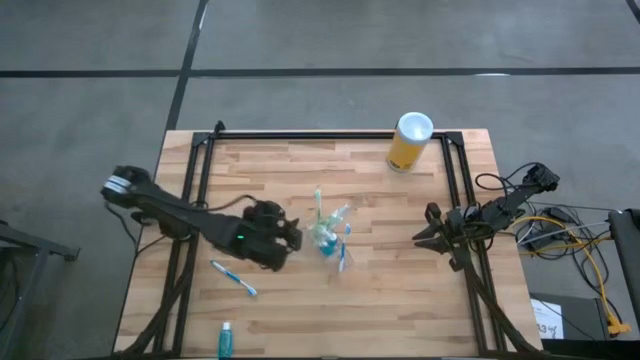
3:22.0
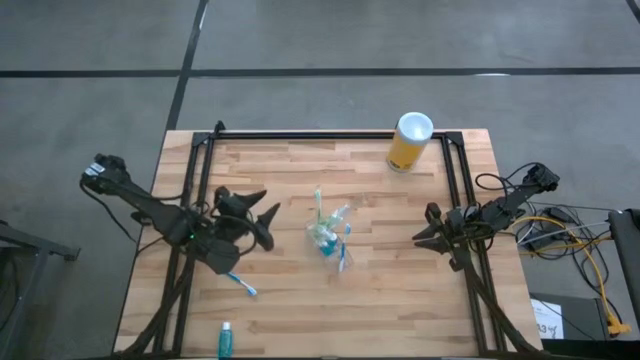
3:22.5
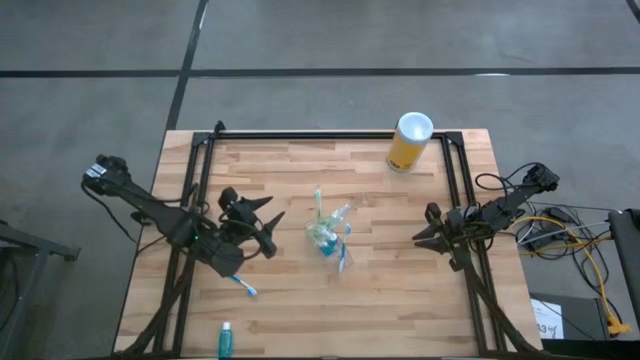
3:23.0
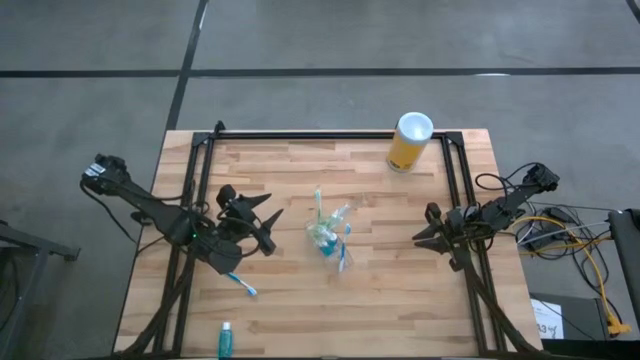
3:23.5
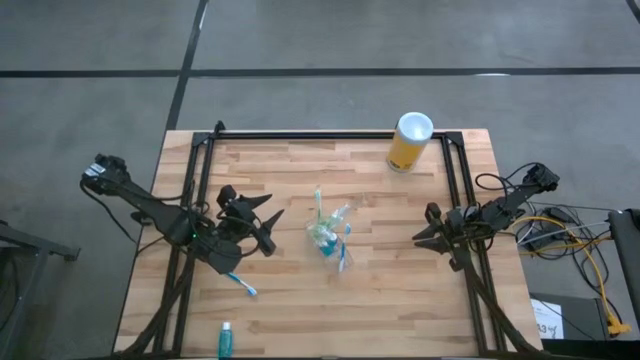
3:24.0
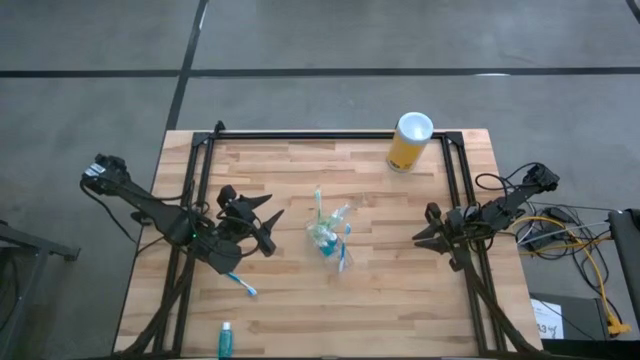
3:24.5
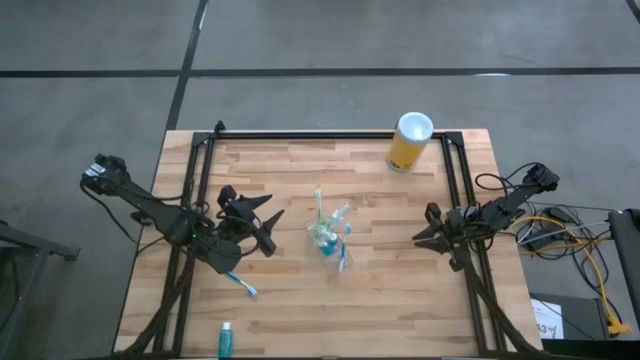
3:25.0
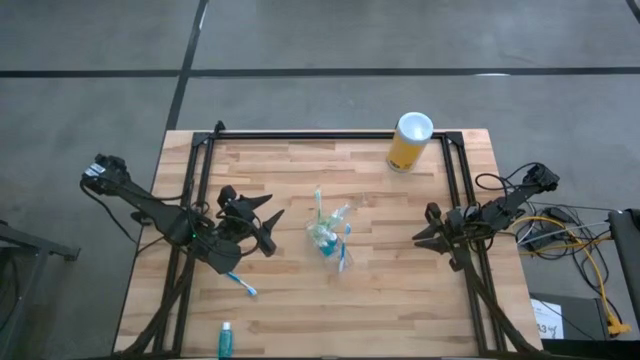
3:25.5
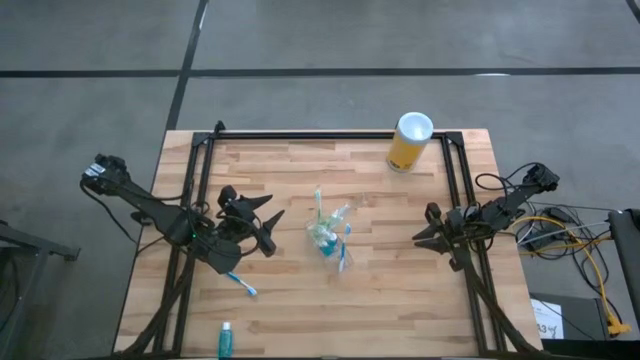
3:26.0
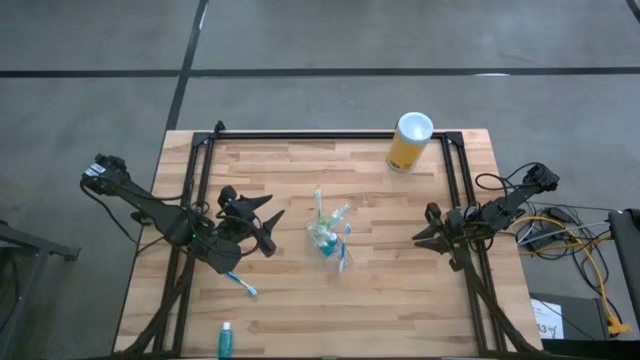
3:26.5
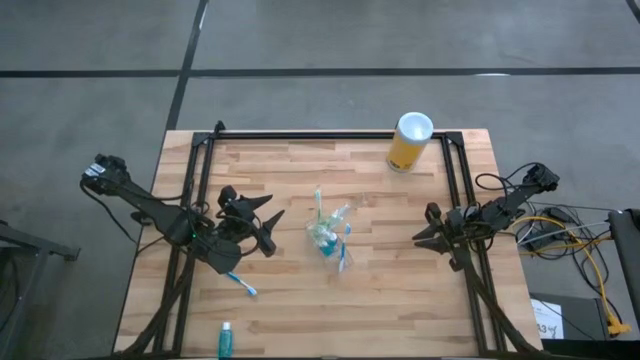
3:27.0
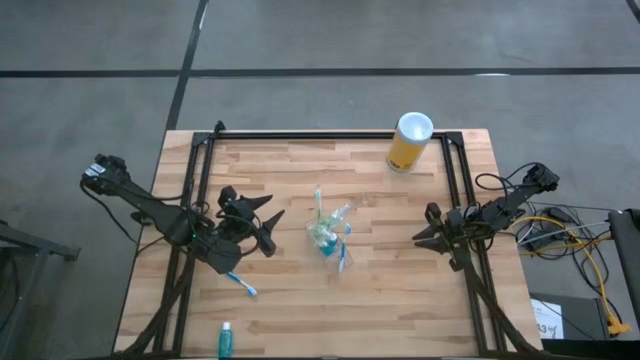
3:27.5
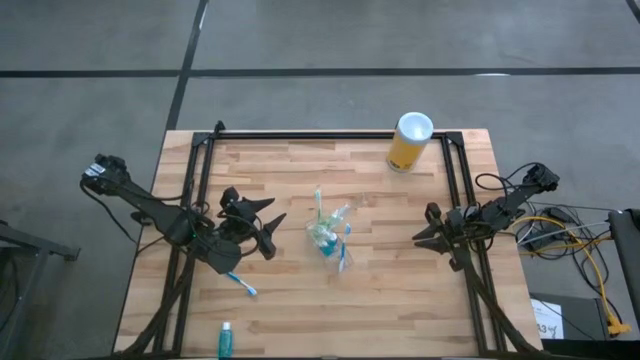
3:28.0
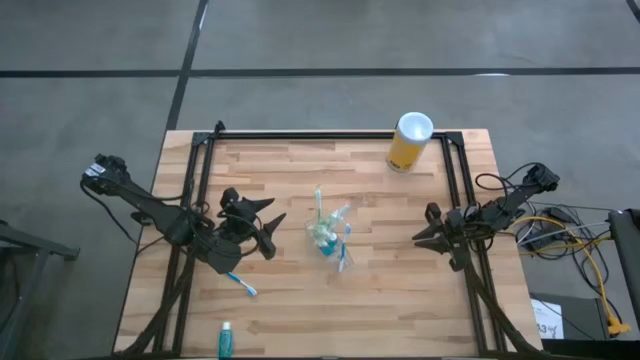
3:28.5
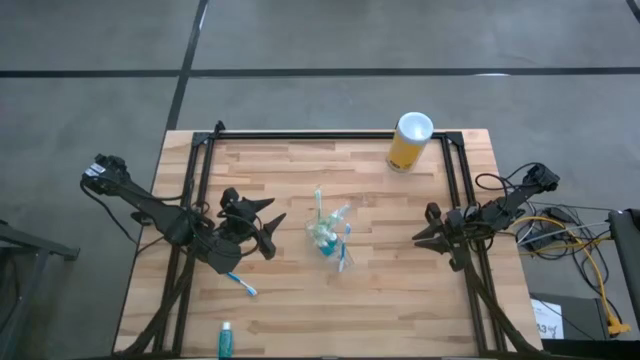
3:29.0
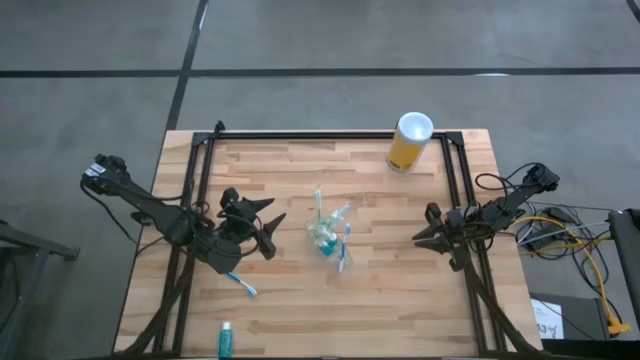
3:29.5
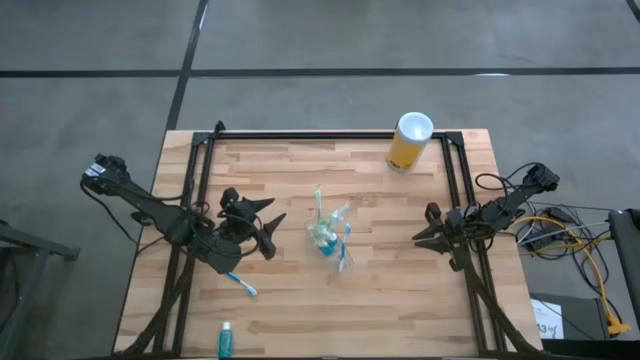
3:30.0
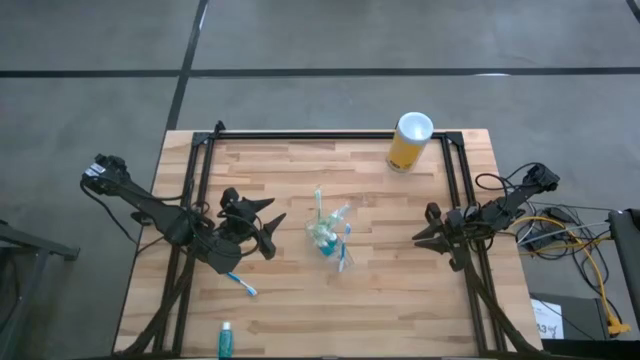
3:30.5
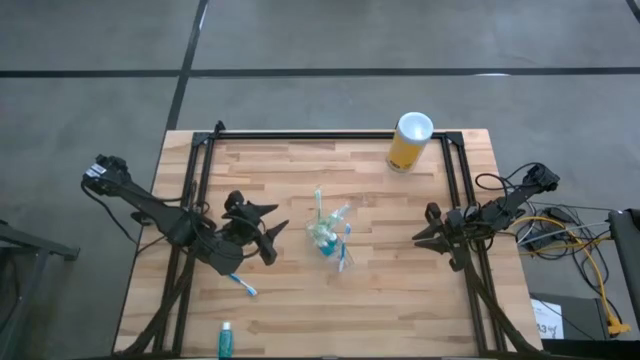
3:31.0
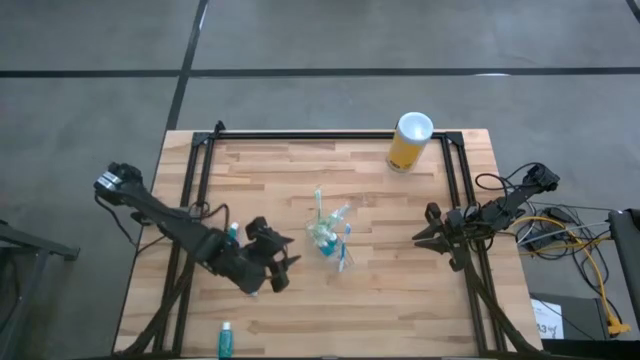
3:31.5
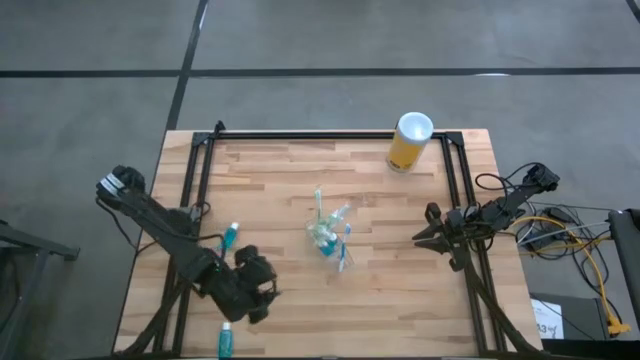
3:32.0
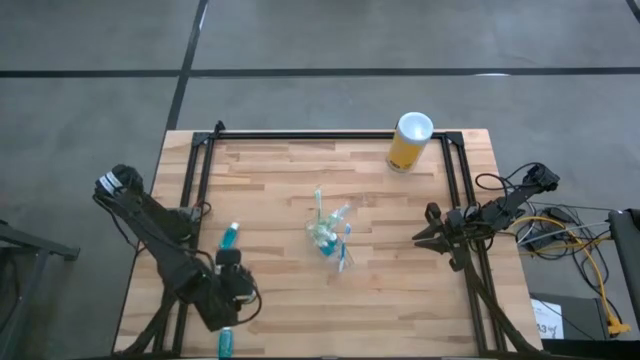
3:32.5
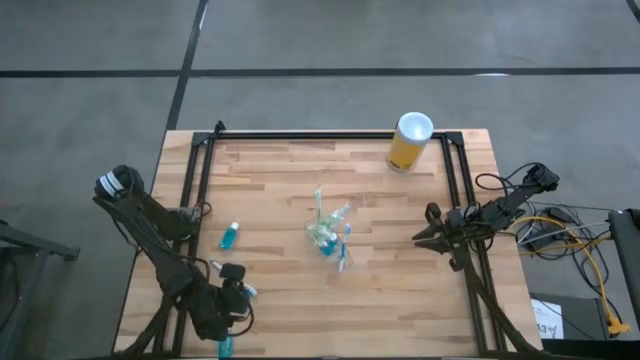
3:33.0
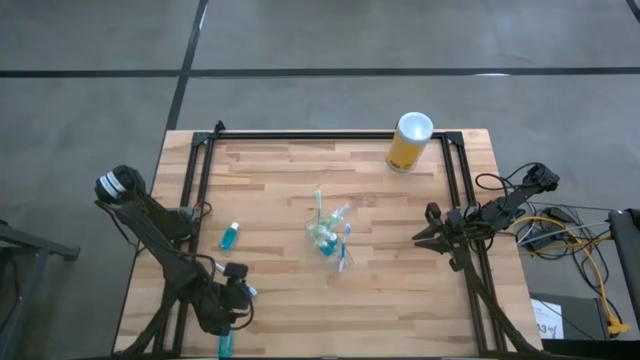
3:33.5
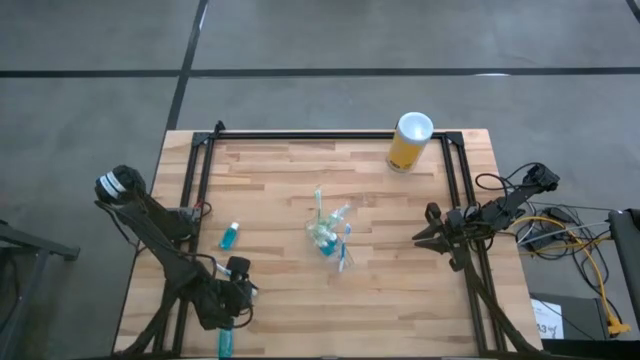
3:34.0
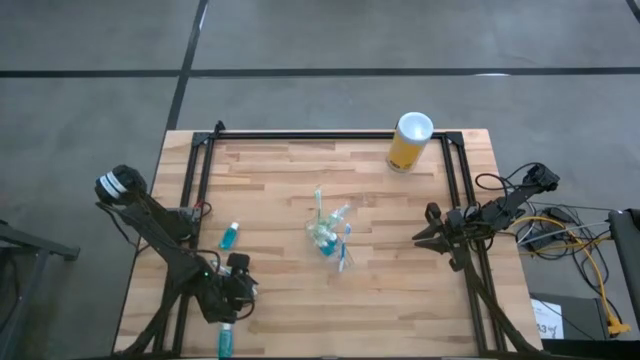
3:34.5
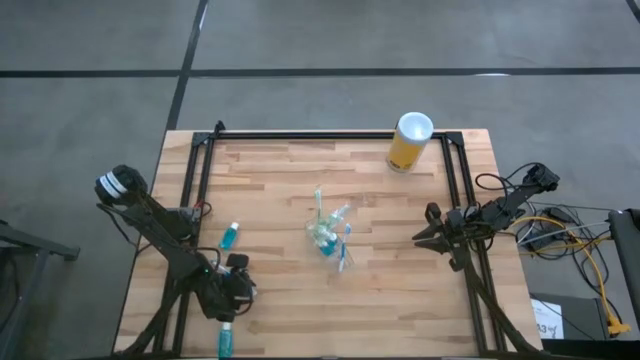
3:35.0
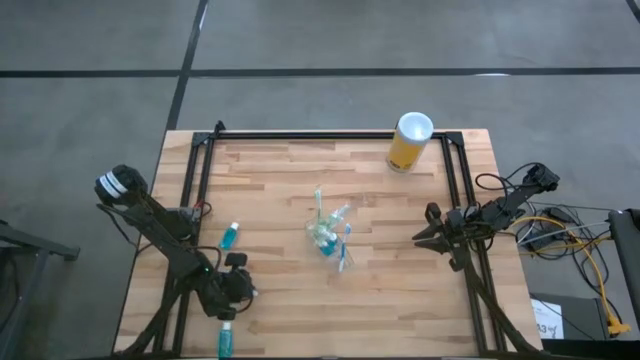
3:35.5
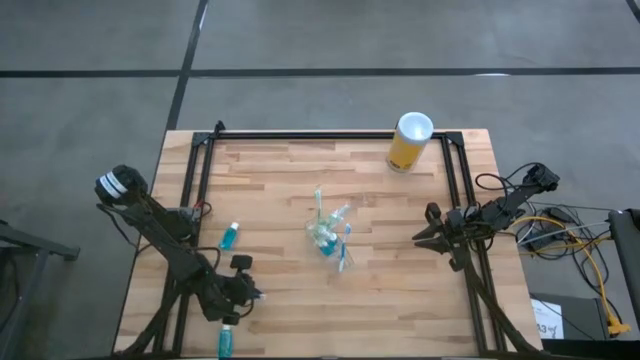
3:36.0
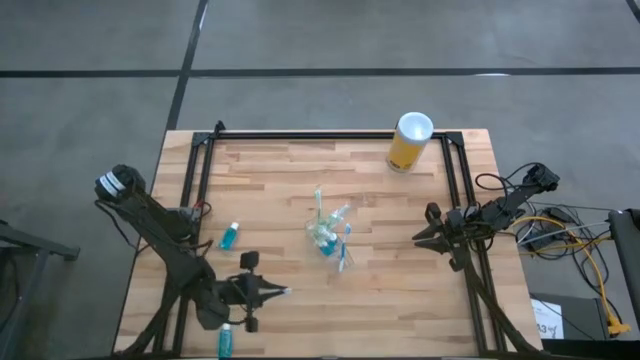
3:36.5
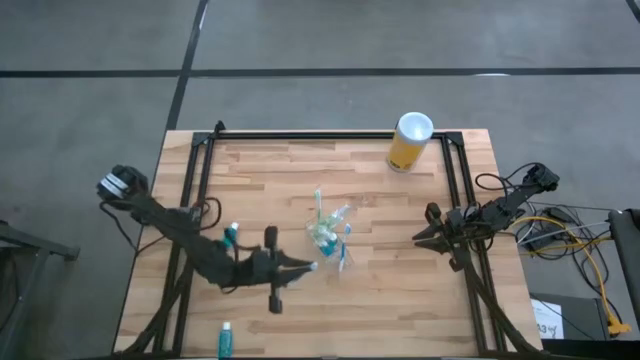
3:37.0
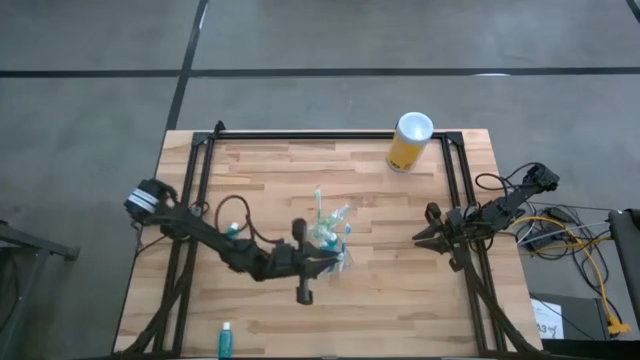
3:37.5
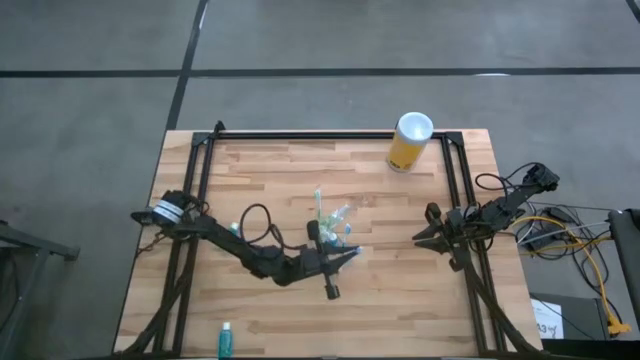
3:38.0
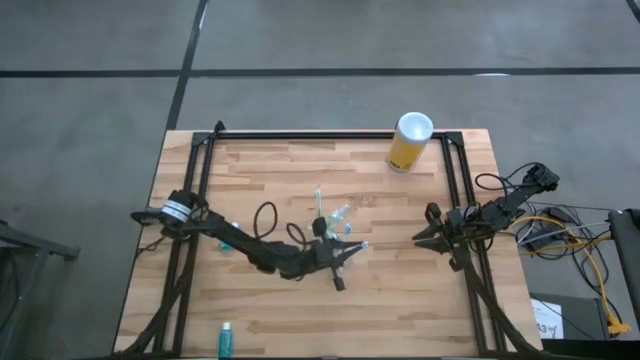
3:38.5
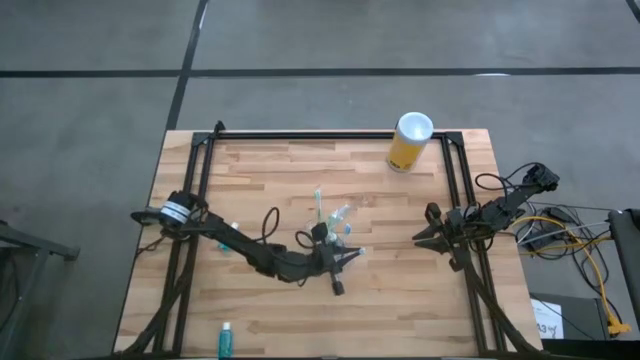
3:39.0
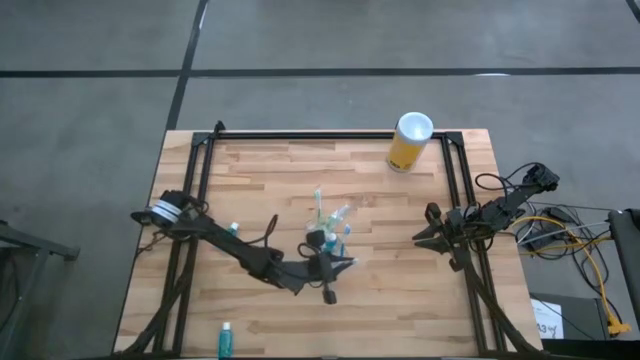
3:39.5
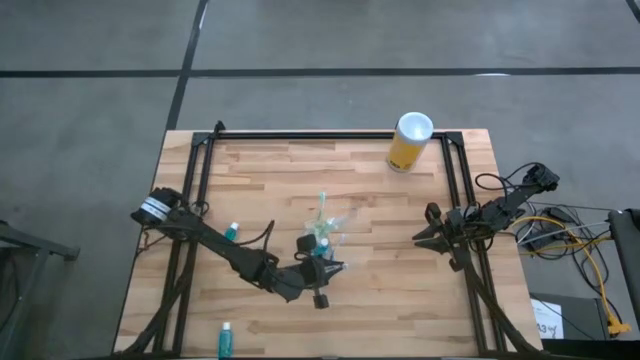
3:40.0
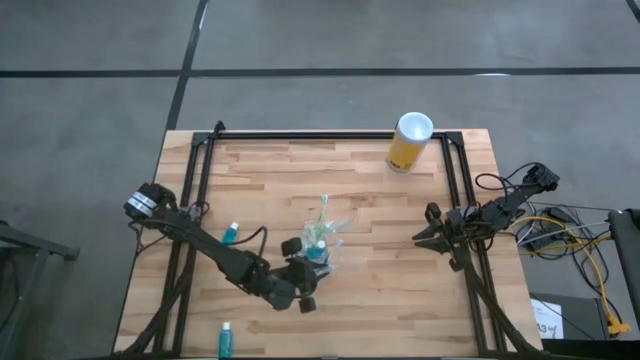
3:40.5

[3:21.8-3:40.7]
Task: Pick & Place toothbrushing station
Put the blue toothbrush into the transparent organizer

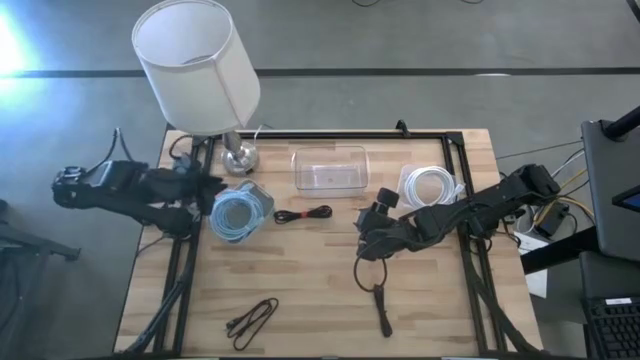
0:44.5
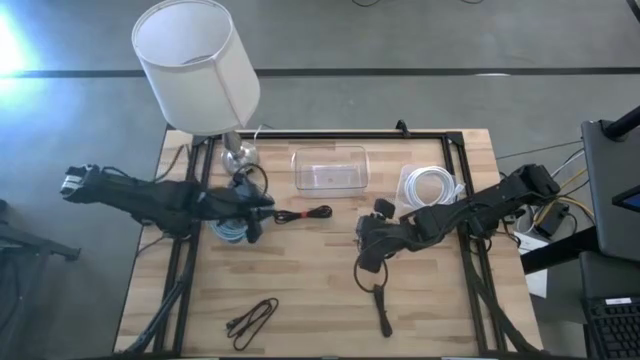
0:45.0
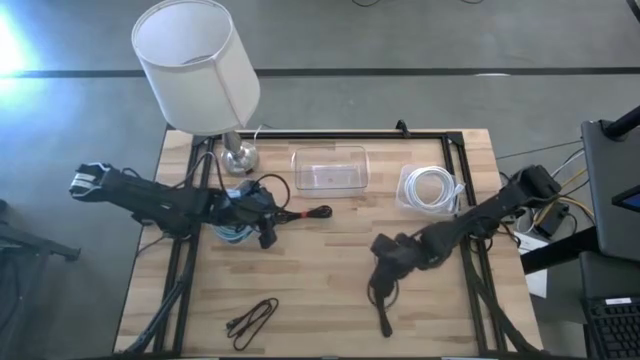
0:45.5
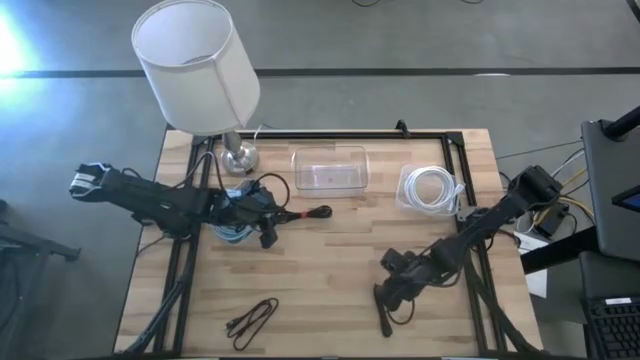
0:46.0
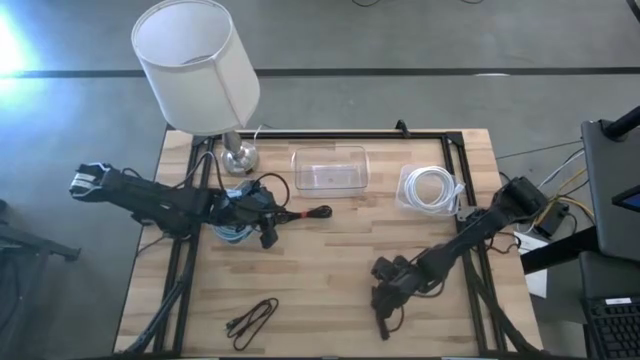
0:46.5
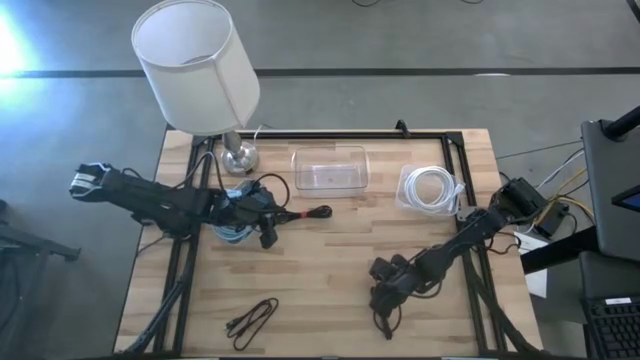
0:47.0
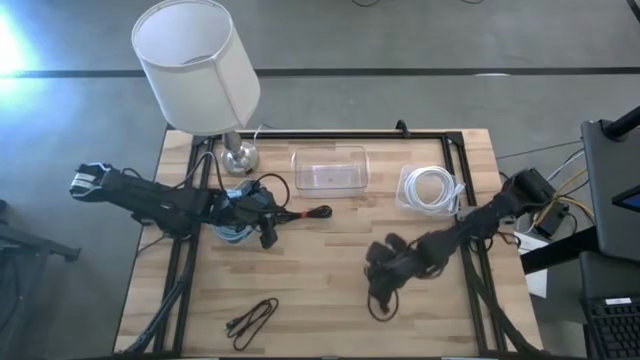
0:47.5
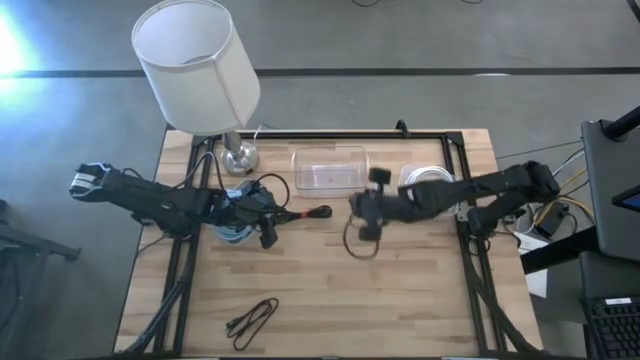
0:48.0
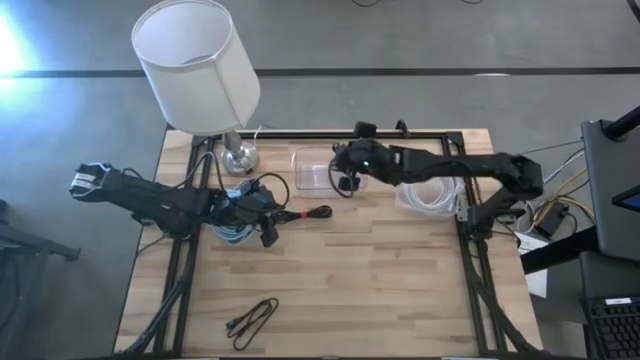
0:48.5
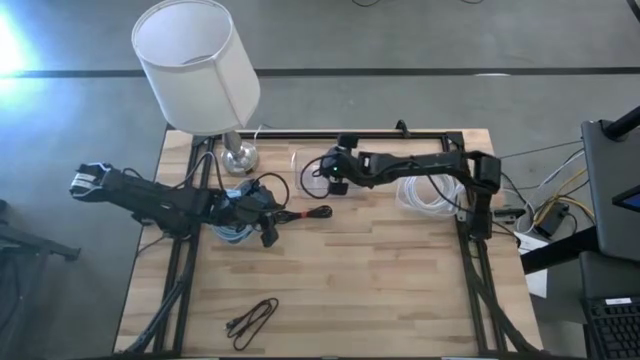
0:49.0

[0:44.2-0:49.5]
Task: Pick & Place USB Port
Put the right black USB cable into the left transparent bin
